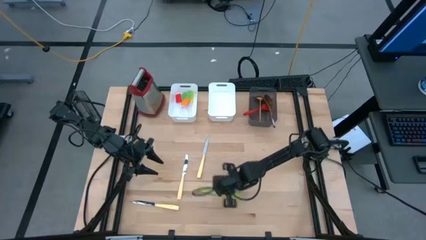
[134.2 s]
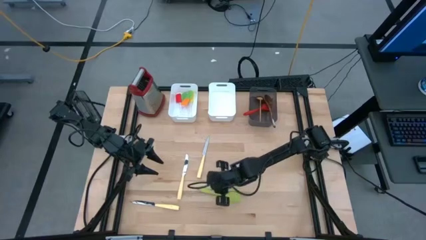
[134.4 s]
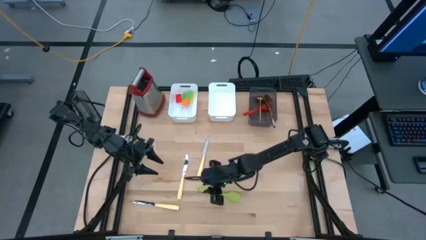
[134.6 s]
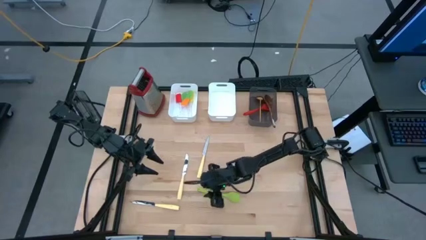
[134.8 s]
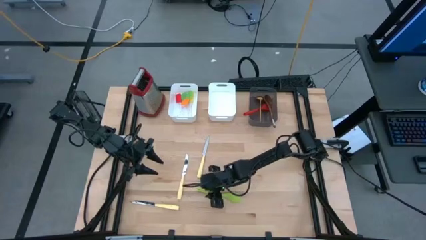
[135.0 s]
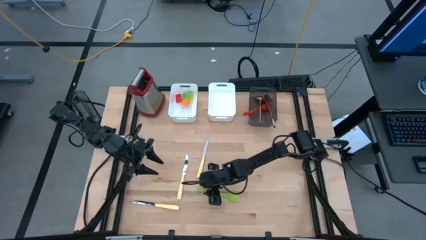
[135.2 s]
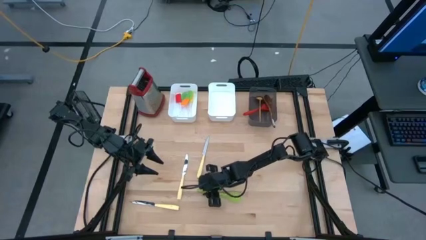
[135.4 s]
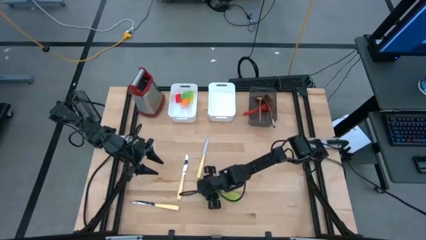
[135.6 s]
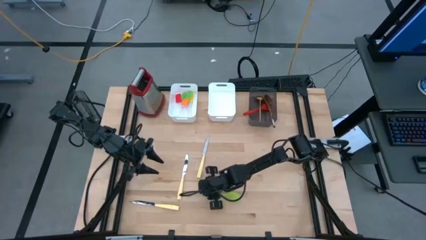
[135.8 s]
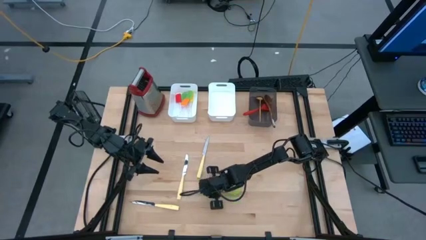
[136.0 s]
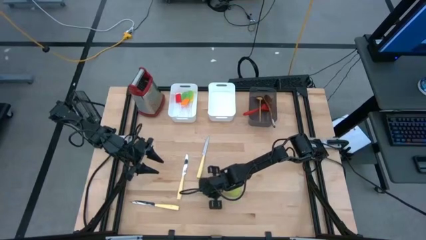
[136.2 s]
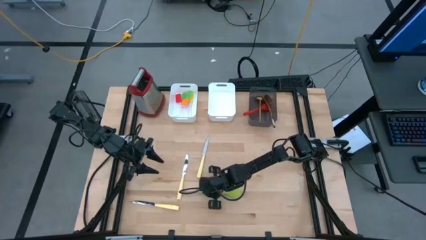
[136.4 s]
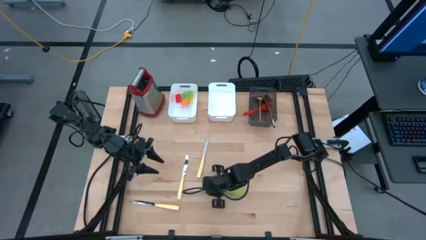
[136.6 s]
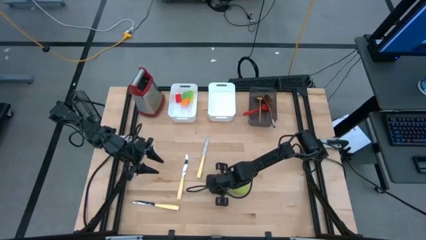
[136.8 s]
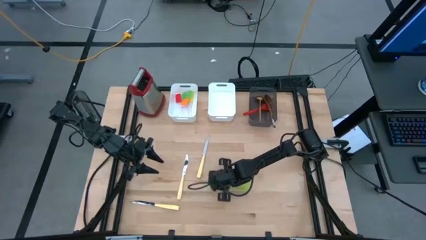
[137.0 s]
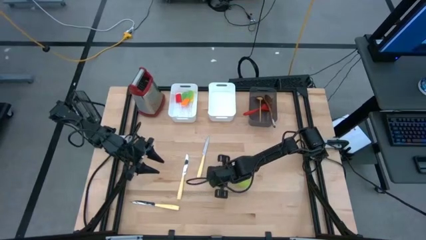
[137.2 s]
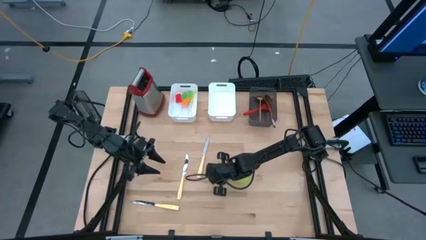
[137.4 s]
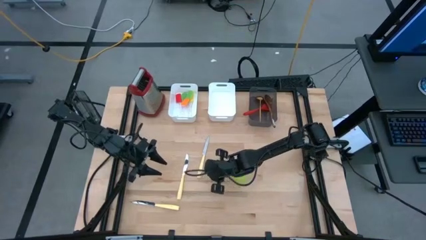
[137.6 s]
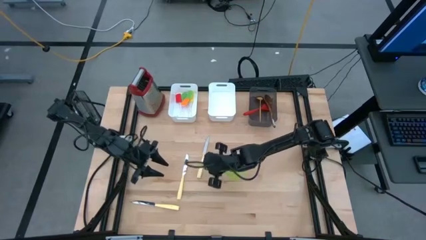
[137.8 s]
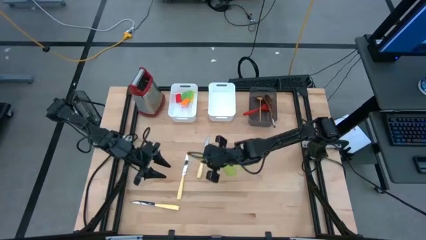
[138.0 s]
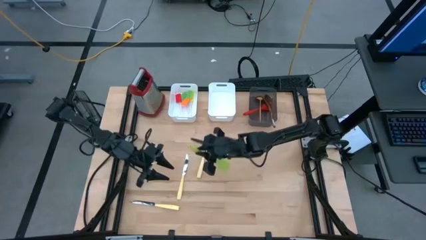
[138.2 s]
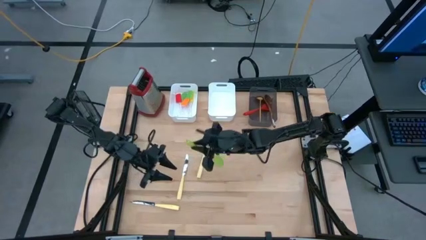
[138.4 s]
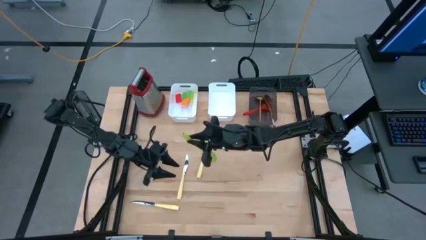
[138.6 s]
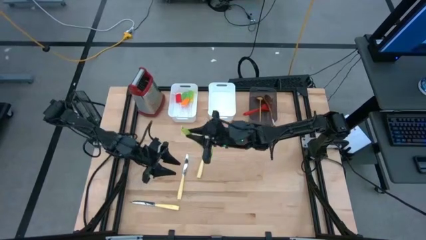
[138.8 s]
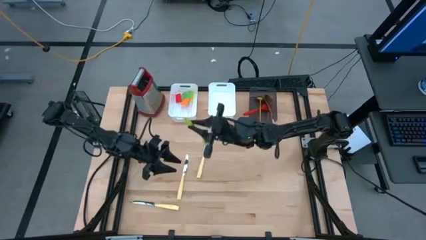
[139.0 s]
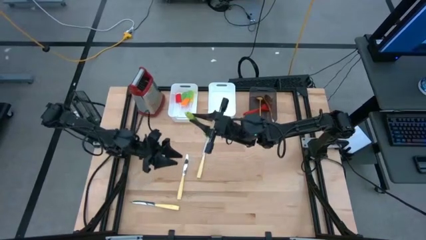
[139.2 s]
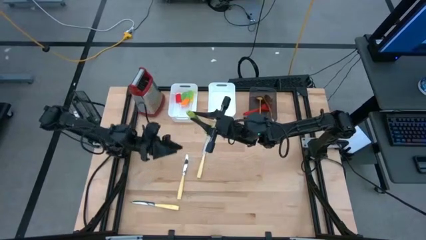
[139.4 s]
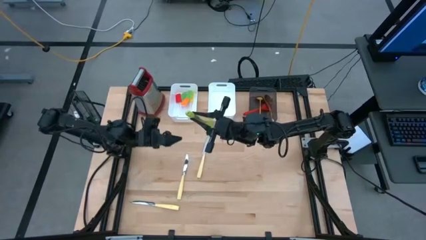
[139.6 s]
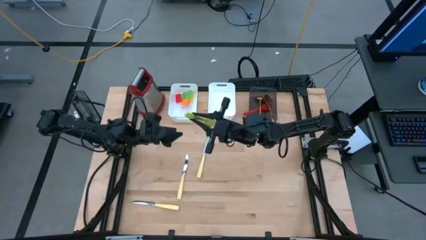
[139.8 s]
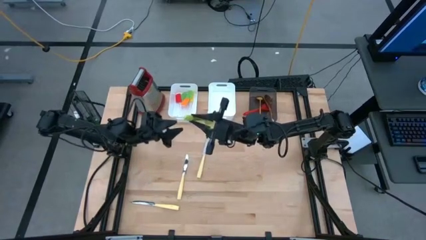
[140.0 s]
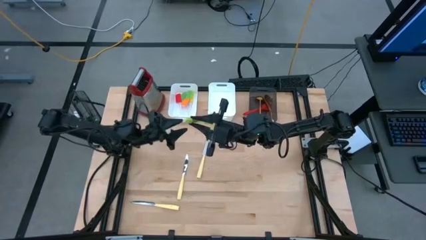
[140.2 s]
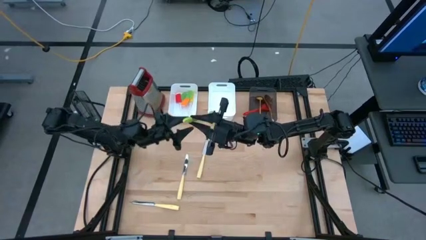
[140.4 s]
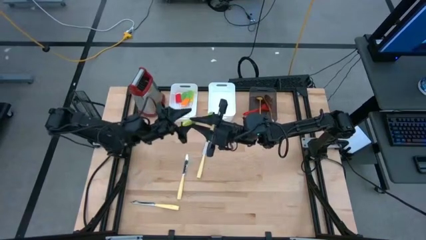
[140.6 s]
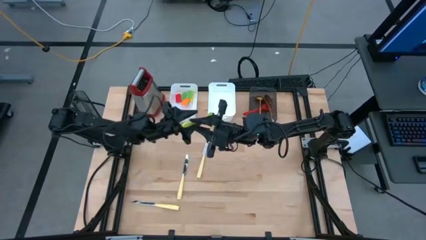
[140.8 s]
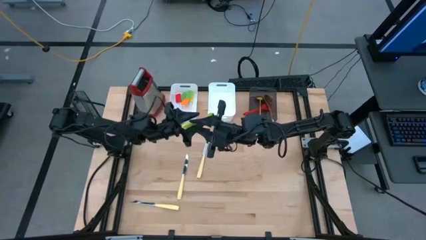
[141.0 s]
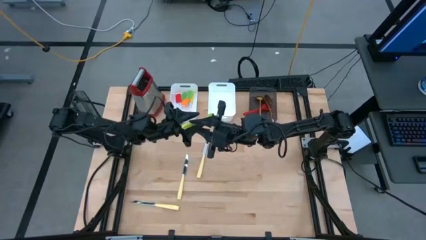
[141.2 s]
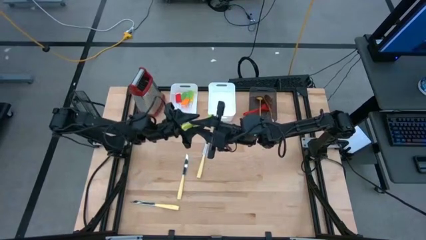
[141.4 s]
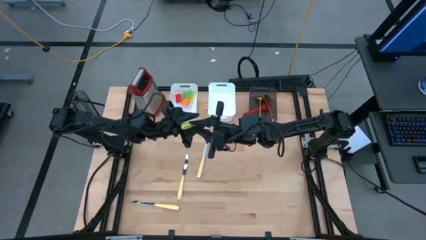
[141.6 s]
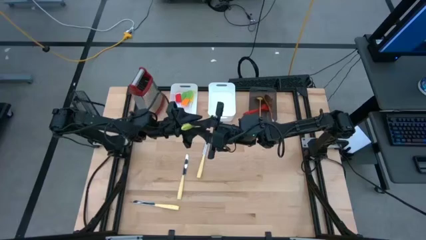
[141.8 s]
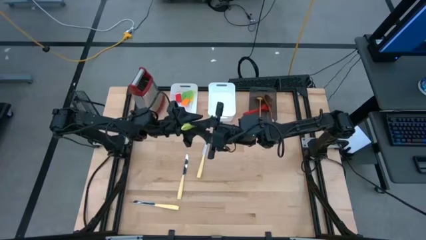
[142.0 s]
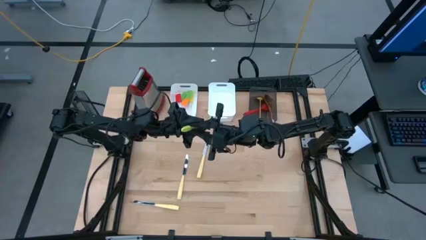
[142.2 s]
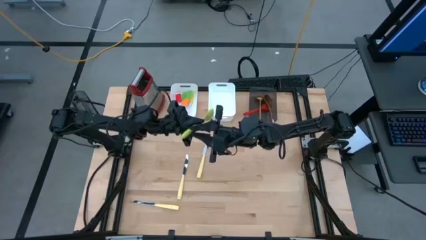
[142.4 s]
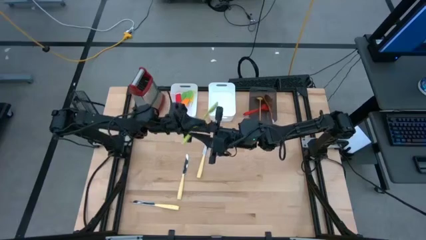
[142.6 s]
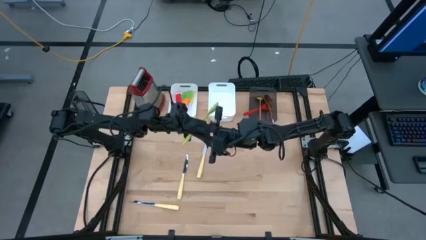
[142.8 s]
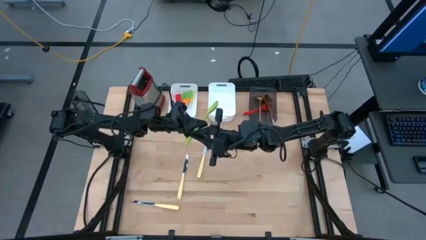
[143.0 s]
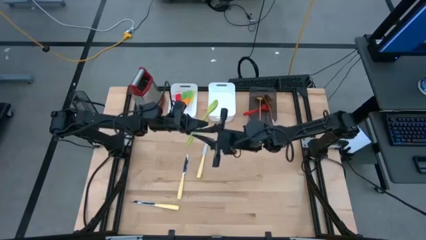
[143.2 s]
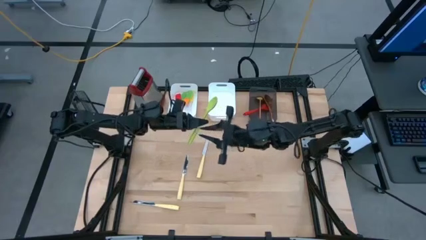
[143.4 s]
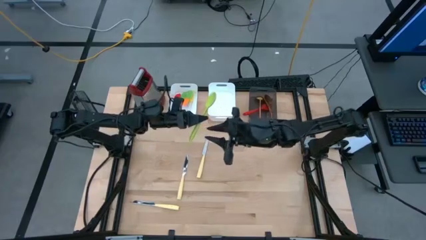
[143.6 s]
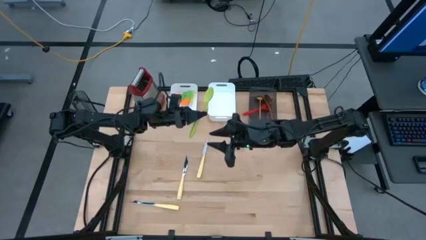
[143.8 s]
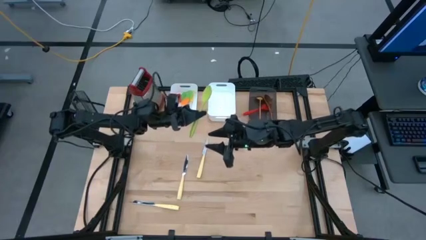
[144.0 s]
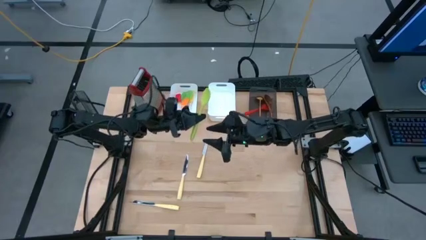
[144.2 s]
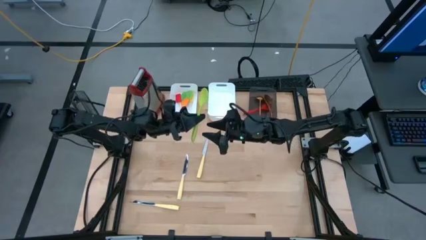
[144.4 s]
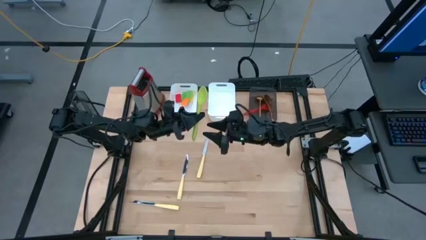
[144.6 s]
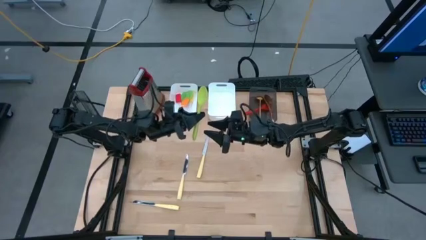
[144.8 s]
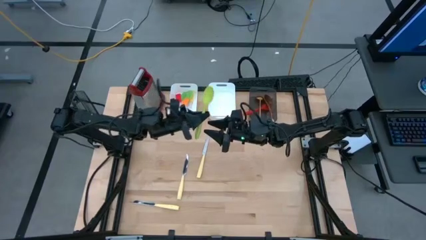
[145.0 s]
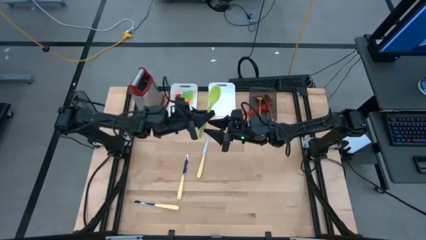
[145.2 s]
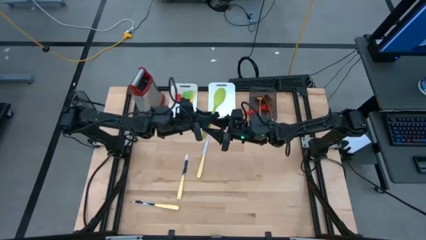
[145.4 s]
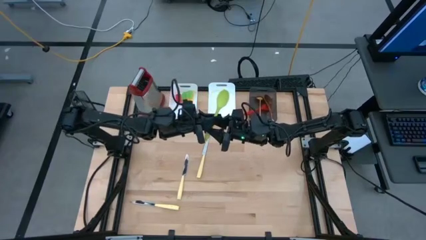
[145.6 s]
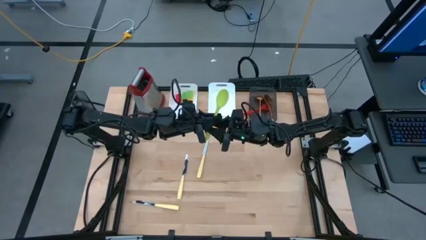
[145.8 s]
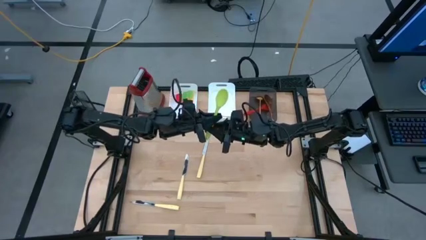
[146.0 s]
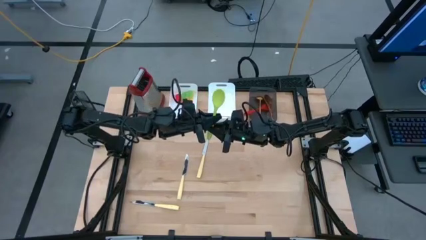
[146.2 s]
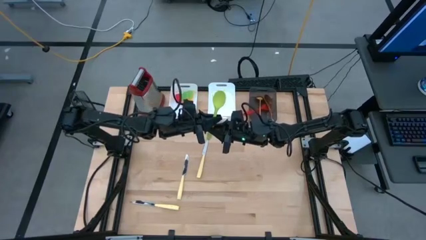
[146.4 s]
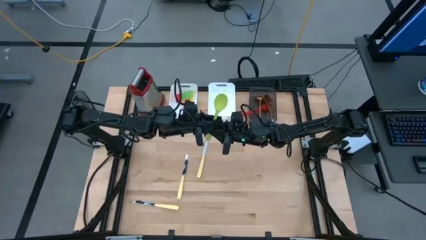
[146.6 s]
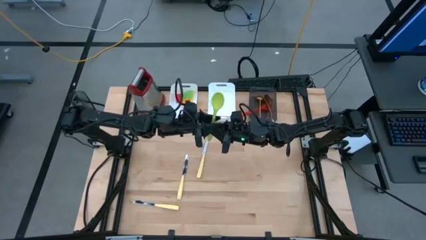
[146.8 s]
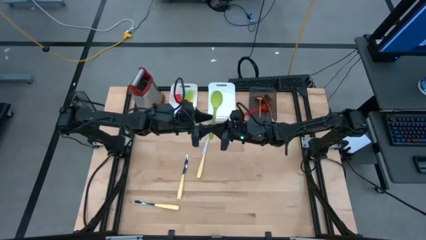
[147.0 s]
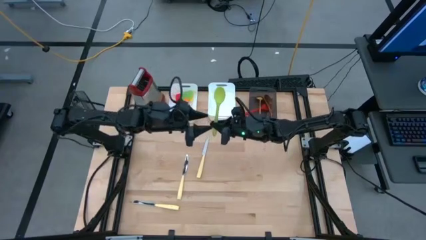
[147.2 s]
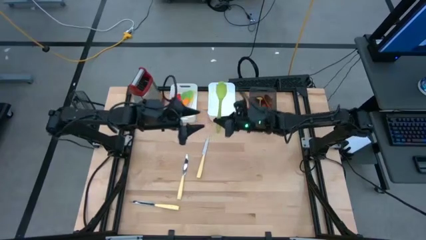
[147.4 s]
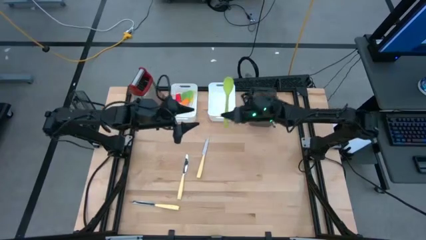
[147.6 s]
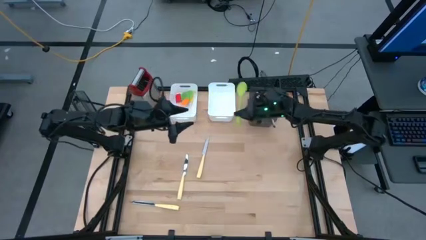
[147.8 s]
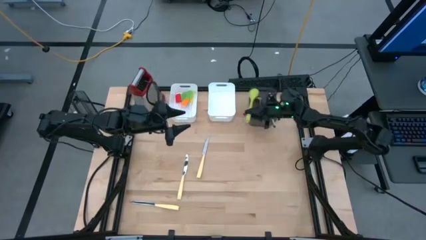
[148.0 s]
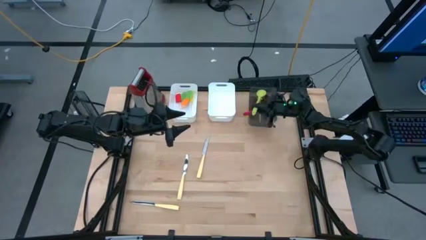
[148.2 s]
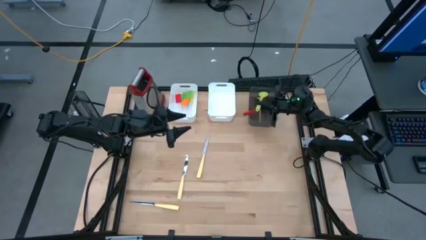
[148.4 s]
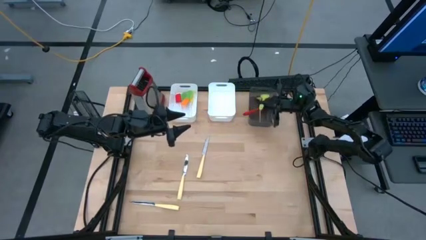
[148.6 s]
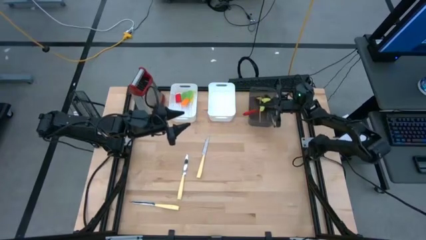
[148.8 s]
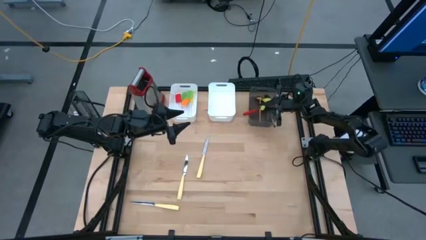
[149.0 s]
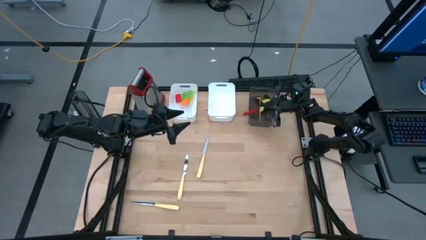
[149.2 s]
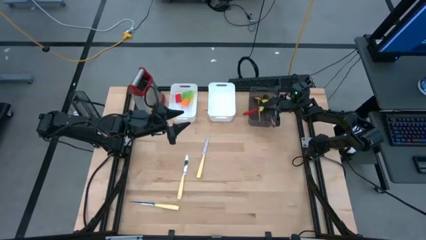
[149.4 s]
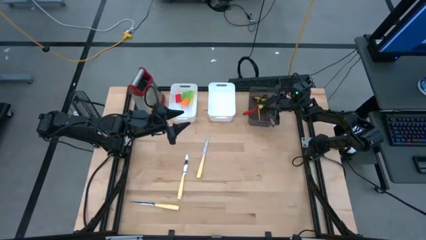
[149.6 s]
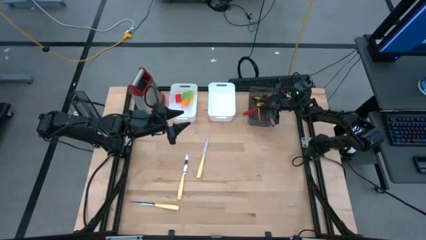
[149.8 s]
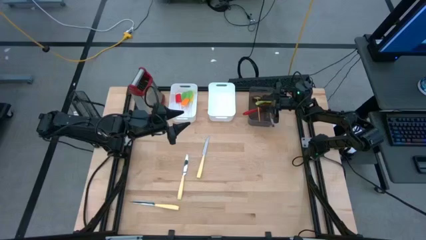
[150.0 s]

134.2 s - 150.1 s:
Task: Pick & Place Kitchen Items
Put the light green serving spoon into the black bin
